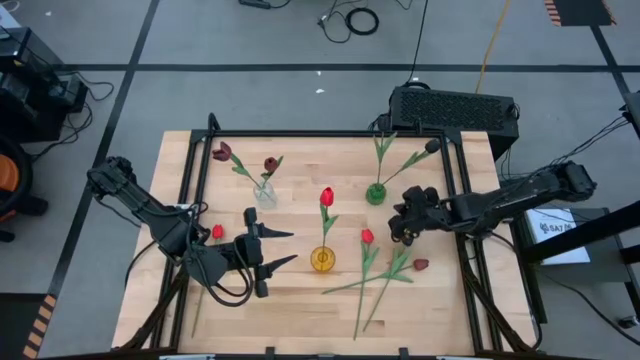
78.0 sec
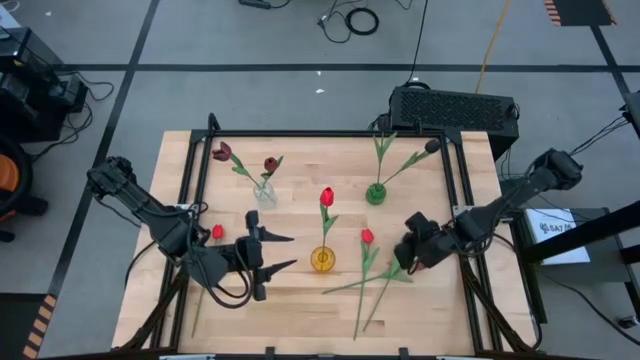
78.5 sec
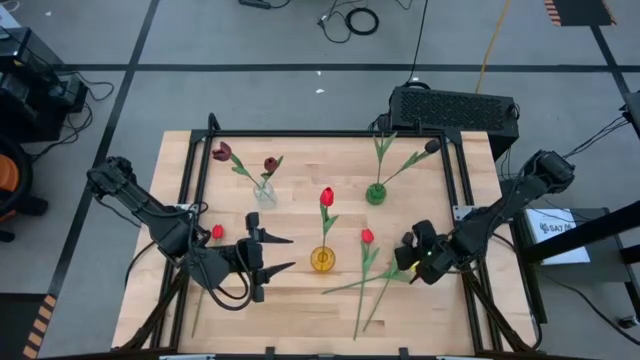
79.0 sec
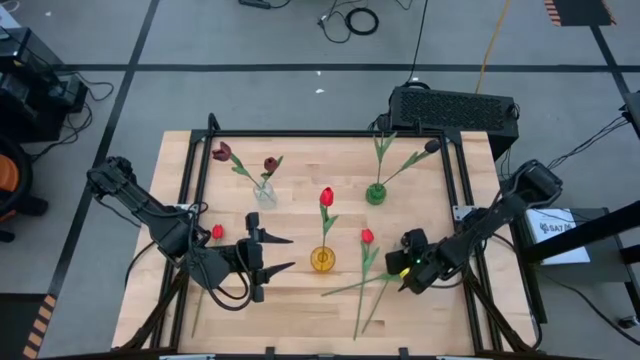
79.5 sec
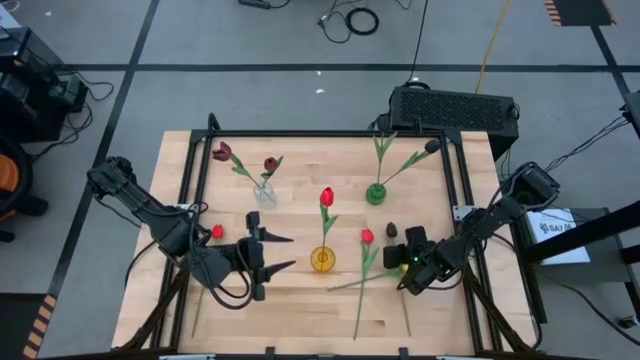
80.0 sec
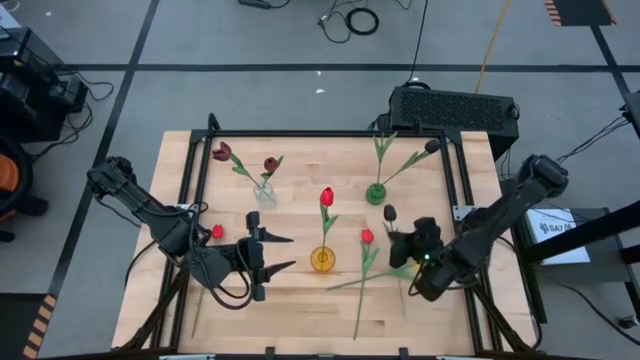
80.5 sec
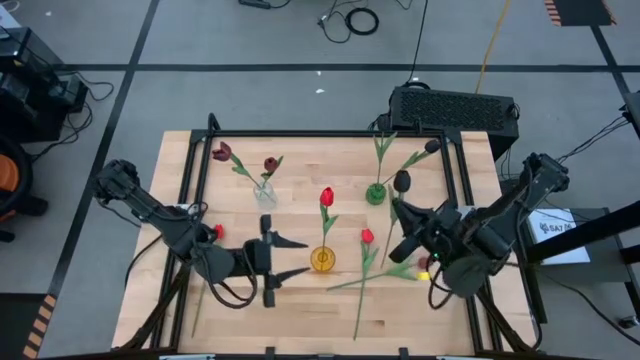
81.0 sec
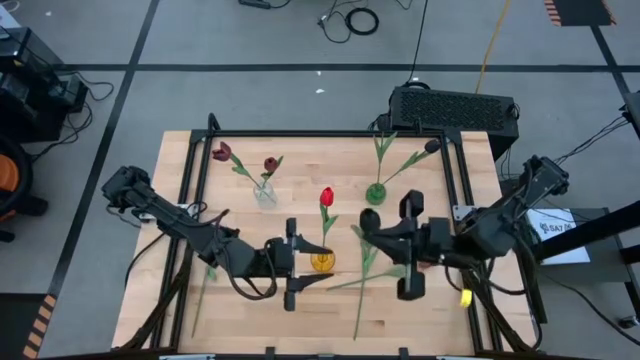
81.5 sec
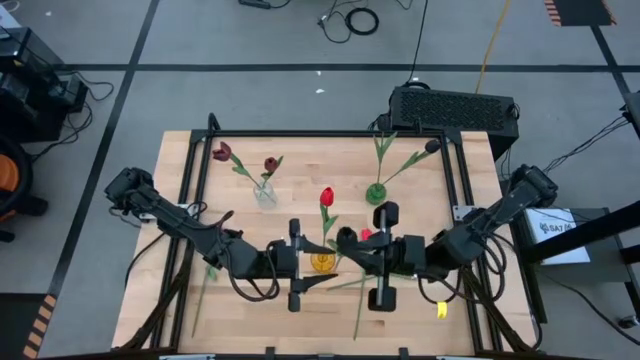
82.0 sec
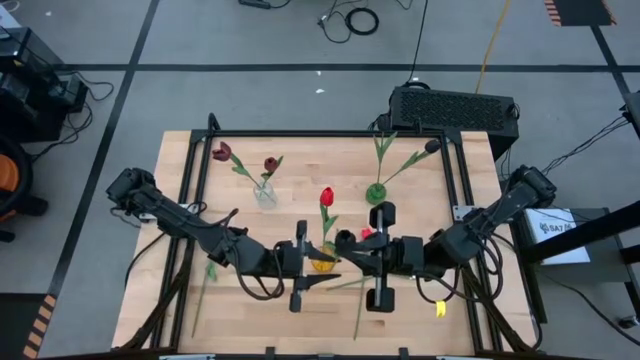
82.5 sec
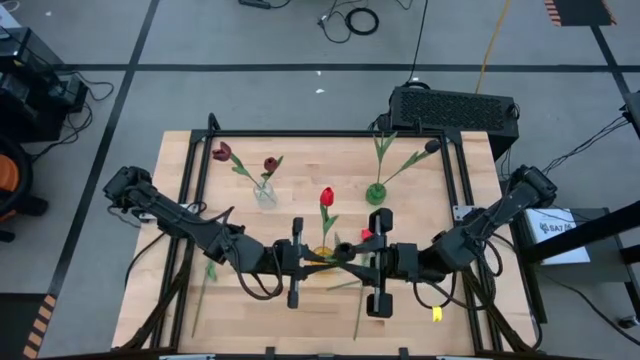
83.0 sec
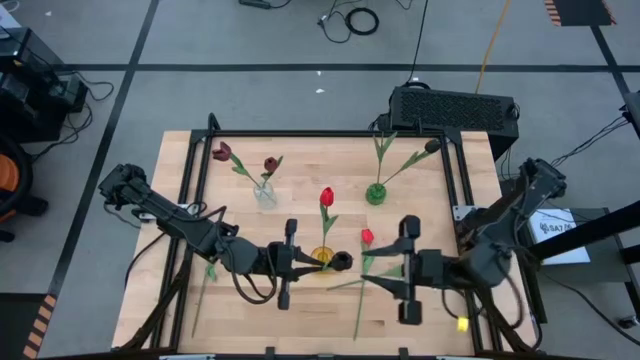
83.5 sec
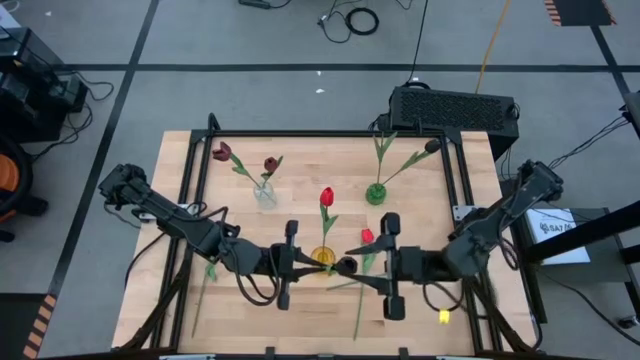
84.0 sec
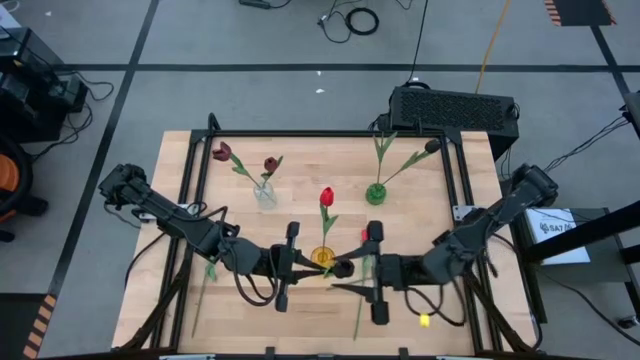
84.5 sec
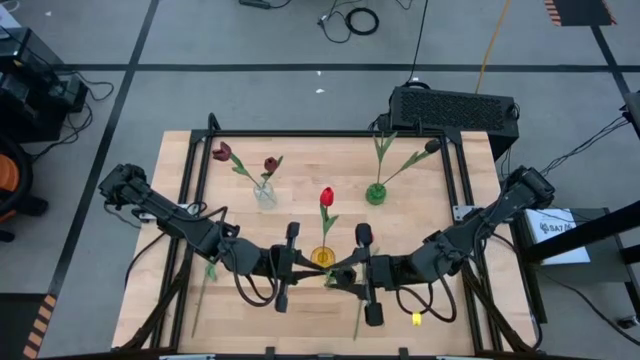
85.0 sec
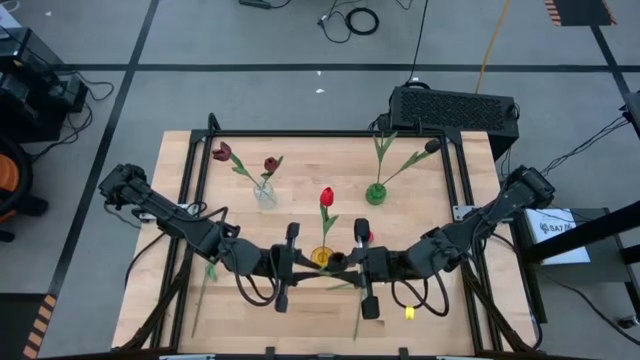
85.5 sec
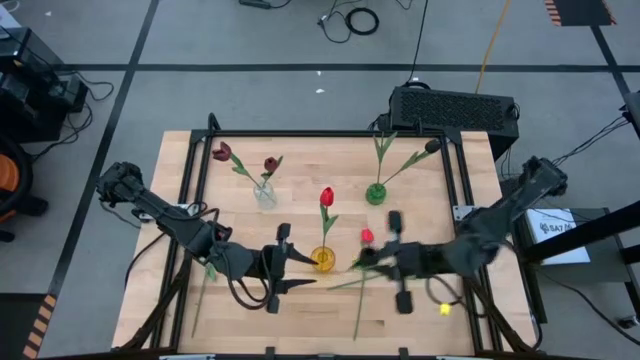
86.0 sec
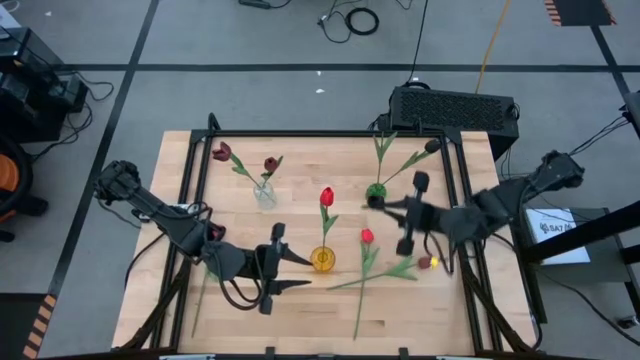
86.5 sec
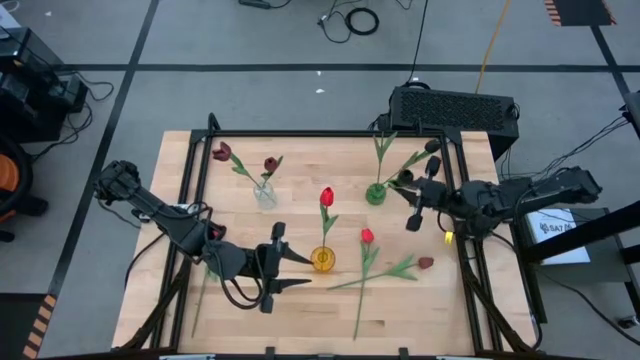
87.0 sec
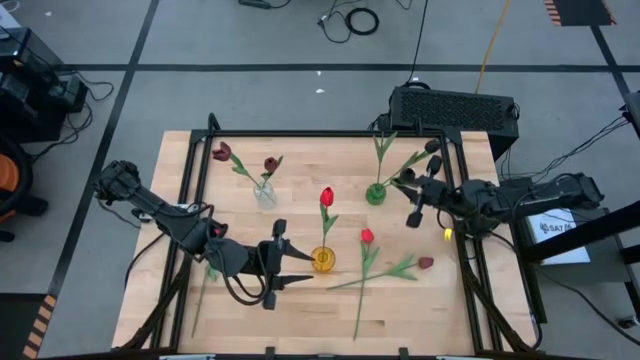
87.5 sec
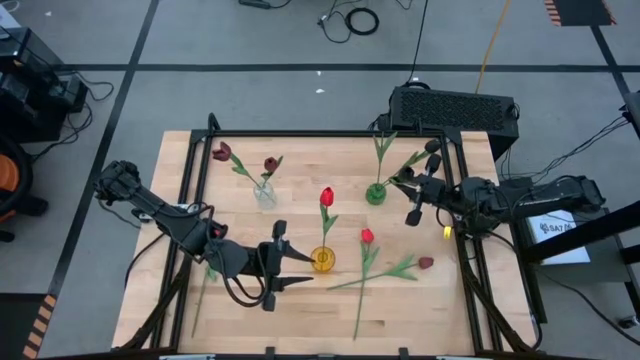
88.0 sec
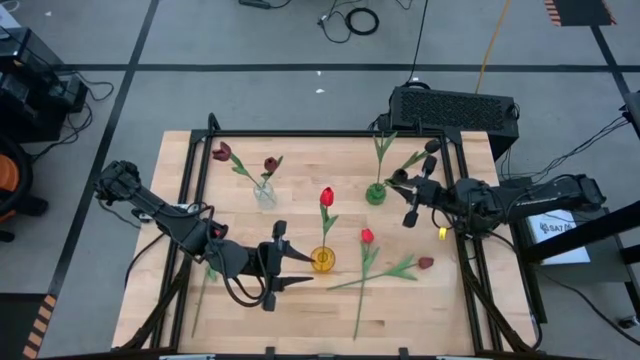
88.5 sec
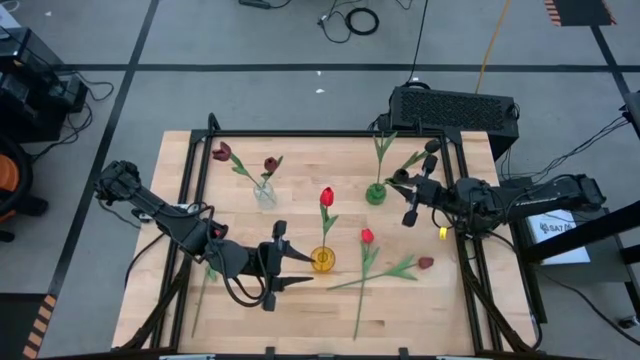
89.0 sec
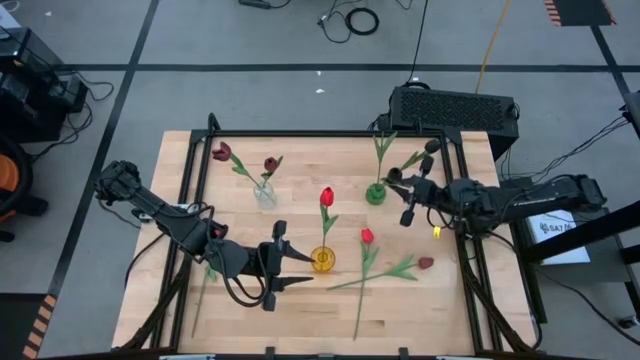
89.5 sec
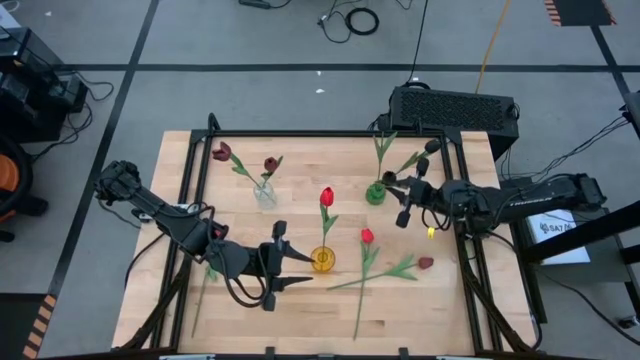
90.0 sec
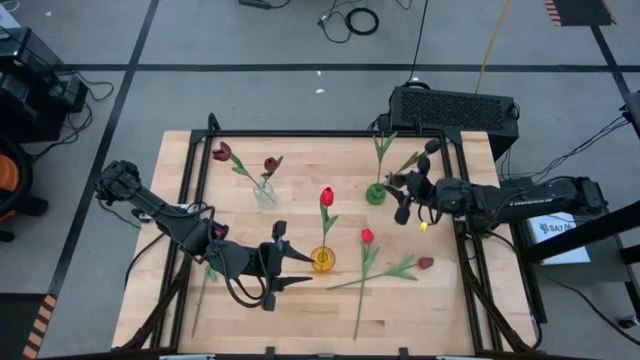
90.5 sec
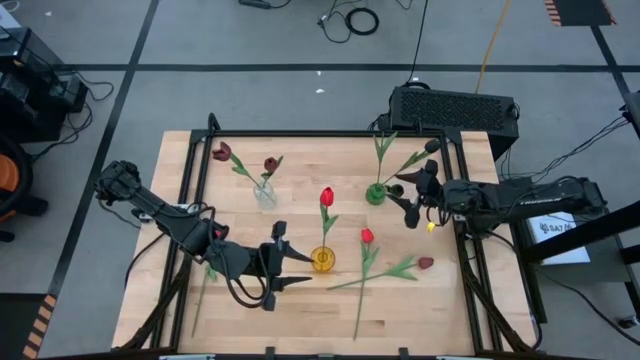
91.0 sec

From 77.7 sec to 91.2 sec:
Task: Sort flowers into vase by color
Put the black flower into the green vase

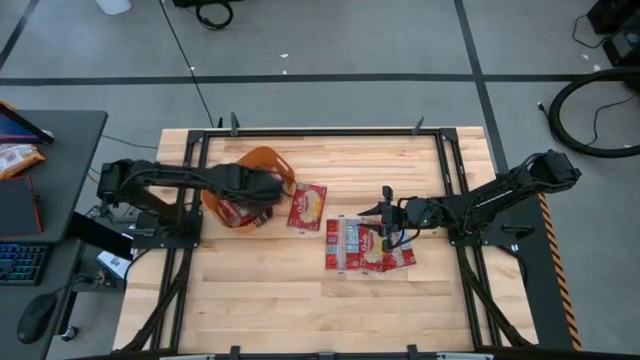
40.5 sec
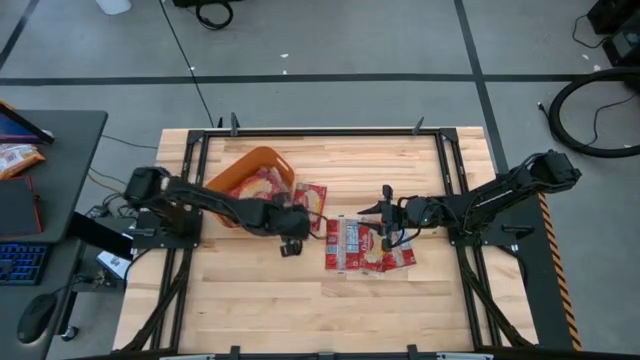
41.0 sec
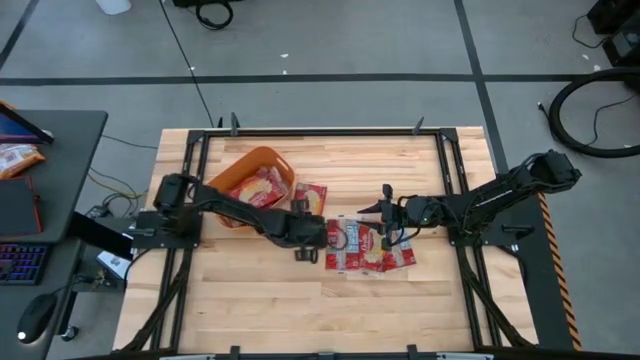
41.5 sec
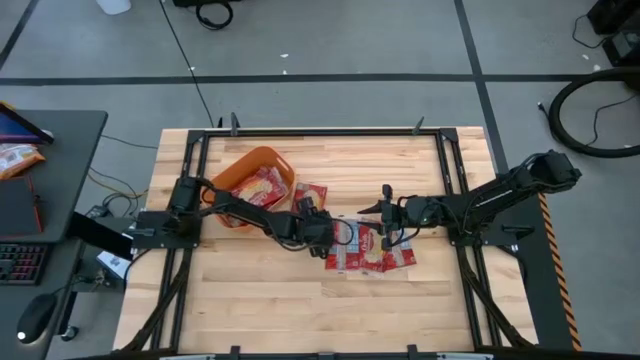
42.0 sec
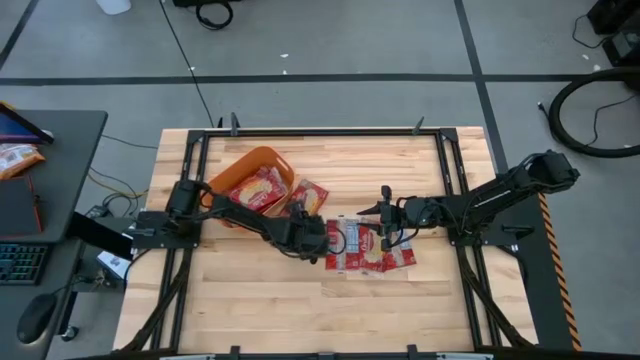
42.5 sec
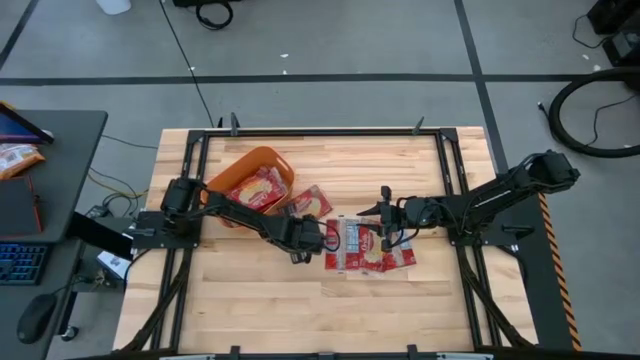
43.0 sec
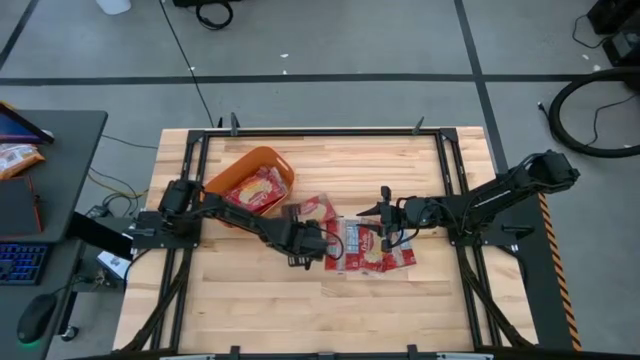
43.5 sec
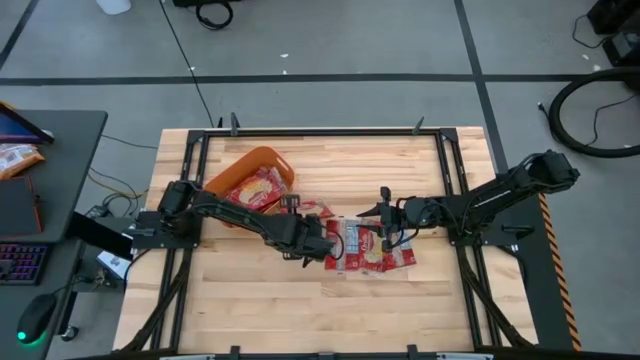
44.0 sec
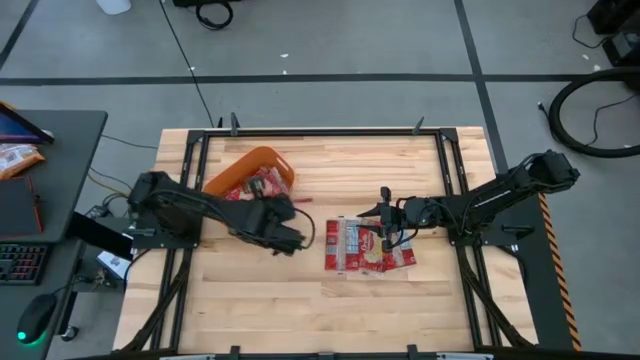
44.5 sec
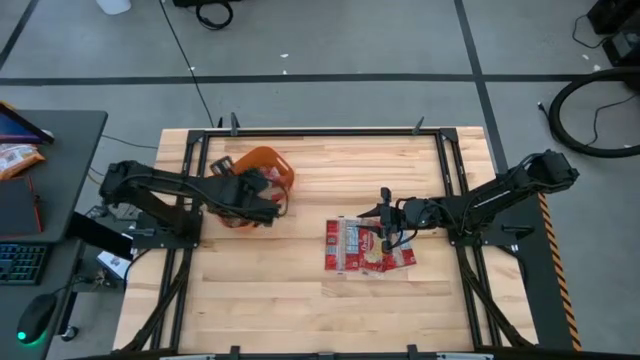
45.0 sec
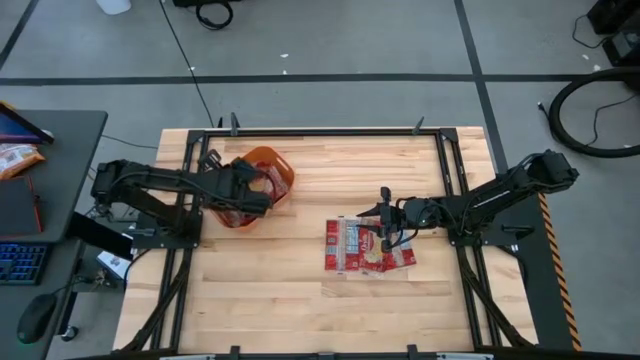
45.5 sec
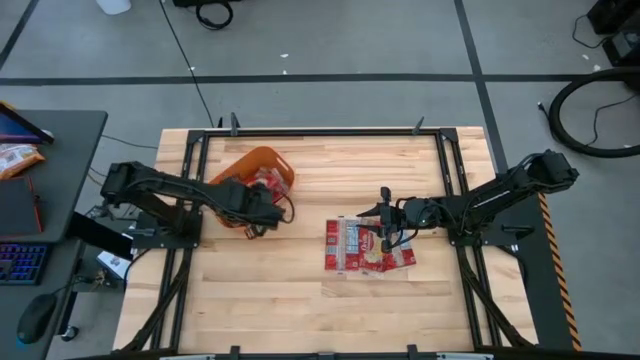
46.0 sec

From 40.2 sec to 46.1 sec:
Task: Sort popcorn bags into baskets
Put the red popcorn bag into the orange bin

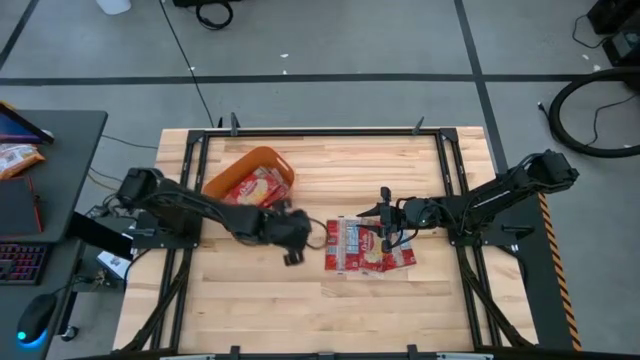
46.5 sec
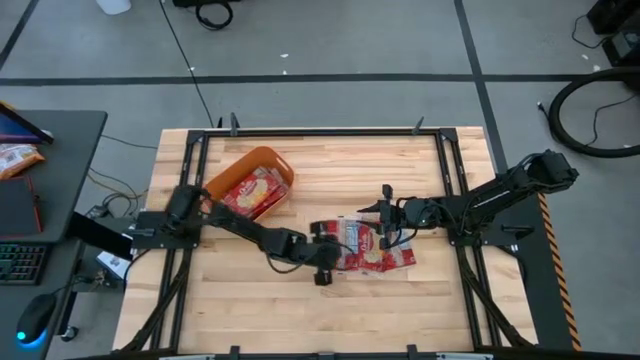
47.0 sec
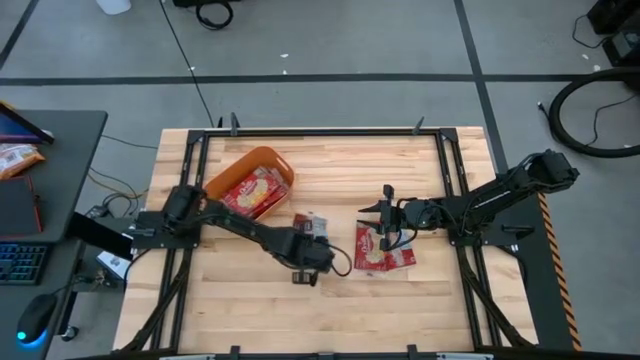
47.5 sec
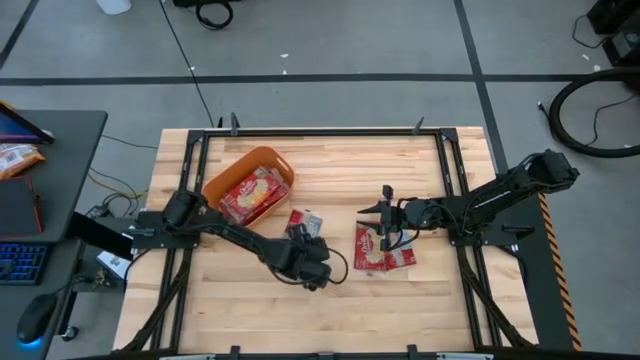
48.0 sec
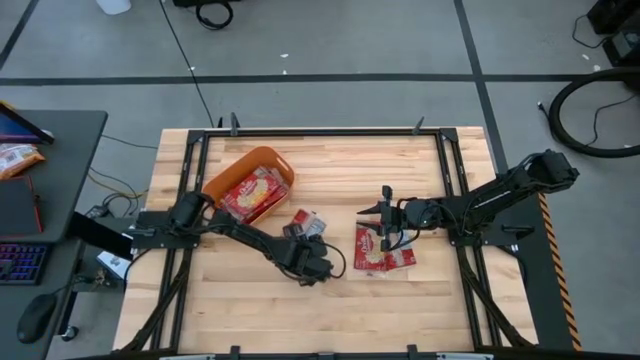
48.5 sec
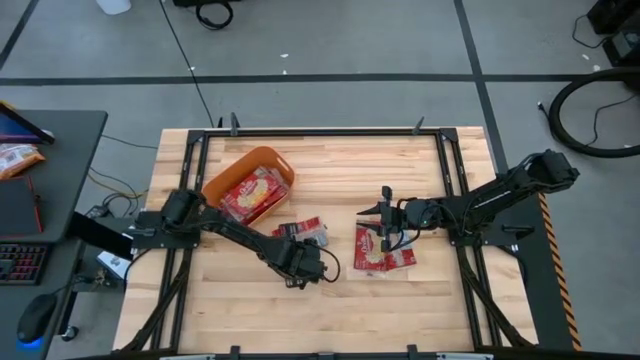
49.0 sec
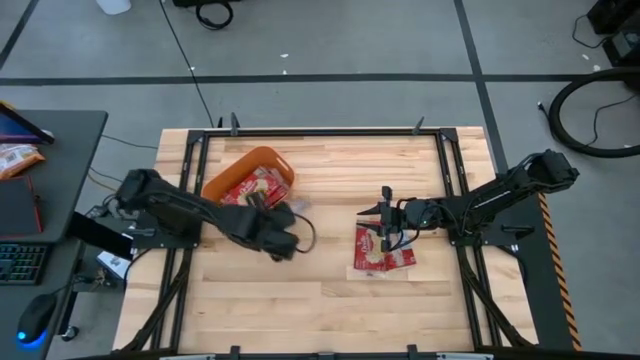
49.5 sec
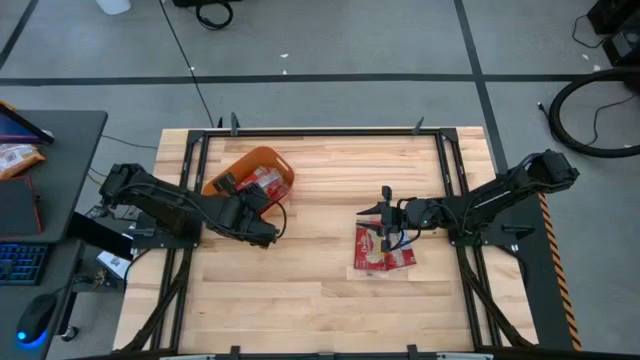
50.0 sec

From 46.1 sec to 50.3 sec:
Put the red popcorn bag into the orange bin
